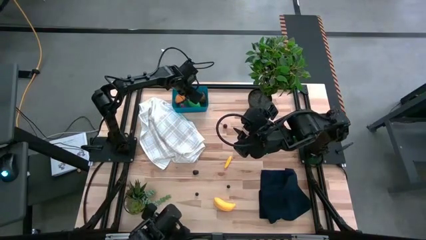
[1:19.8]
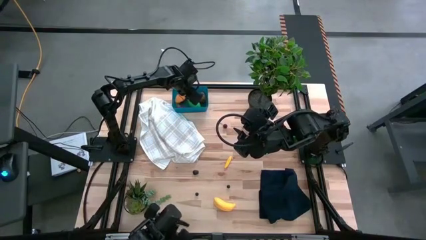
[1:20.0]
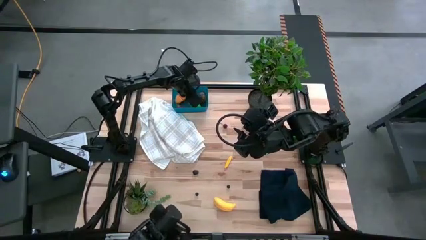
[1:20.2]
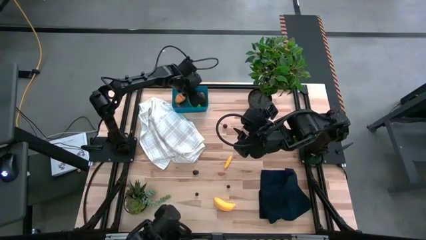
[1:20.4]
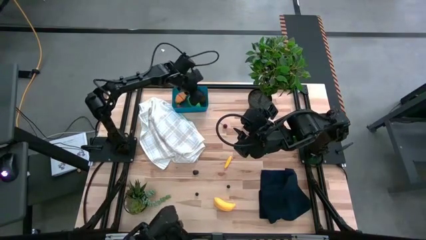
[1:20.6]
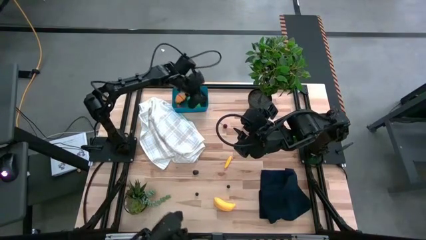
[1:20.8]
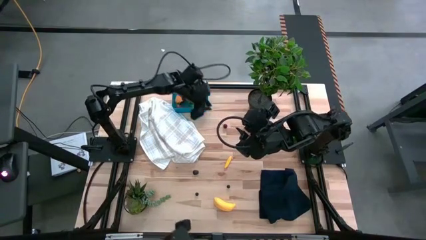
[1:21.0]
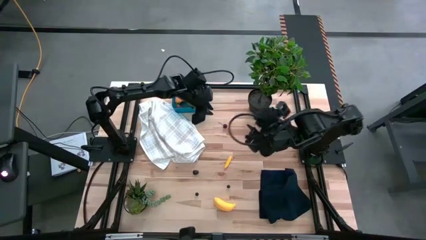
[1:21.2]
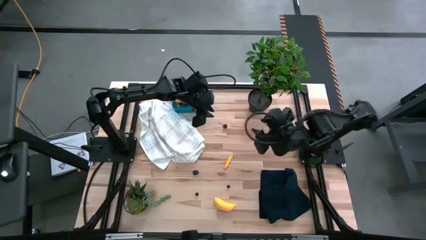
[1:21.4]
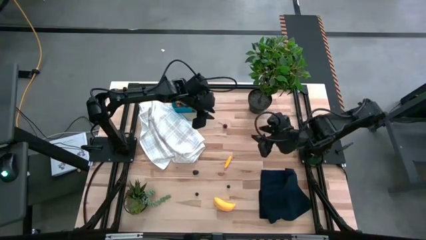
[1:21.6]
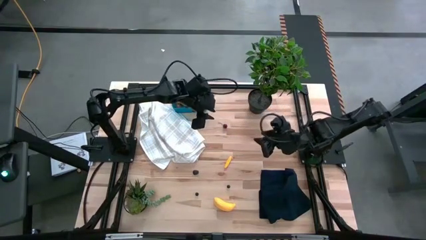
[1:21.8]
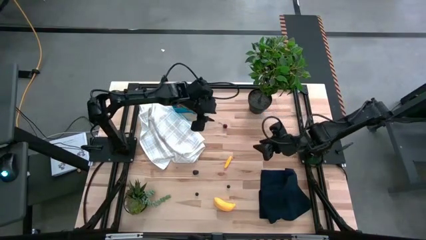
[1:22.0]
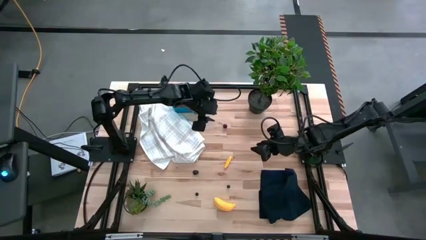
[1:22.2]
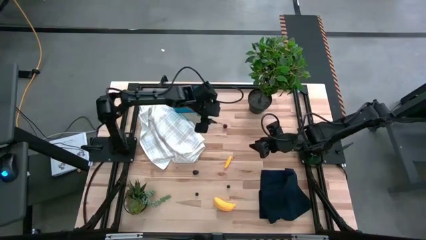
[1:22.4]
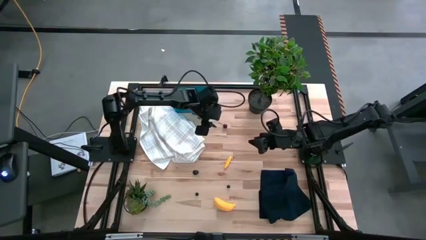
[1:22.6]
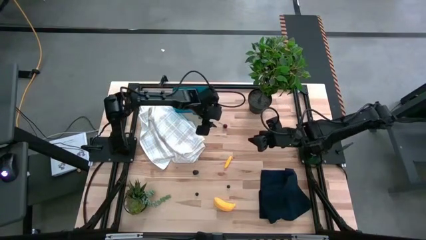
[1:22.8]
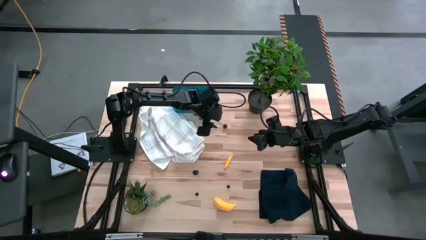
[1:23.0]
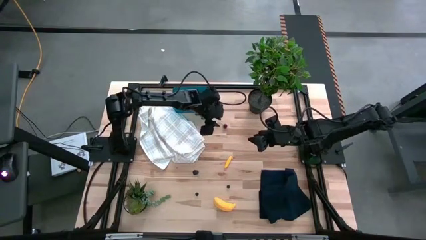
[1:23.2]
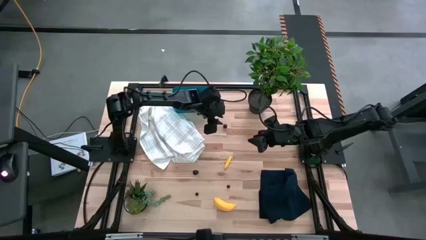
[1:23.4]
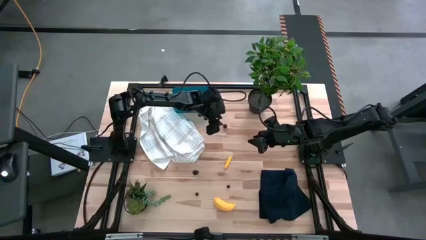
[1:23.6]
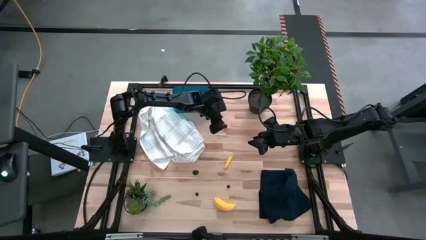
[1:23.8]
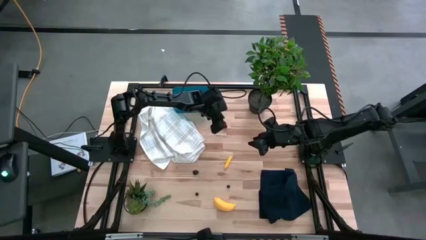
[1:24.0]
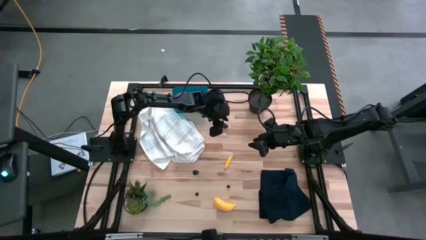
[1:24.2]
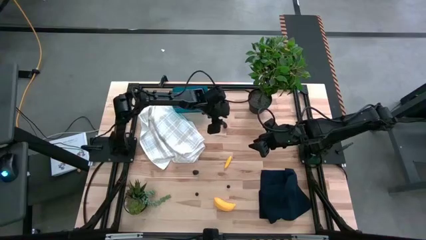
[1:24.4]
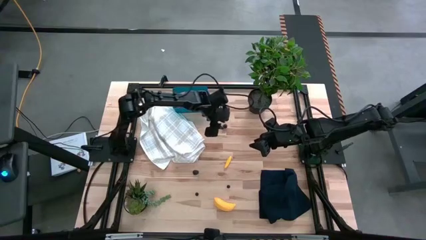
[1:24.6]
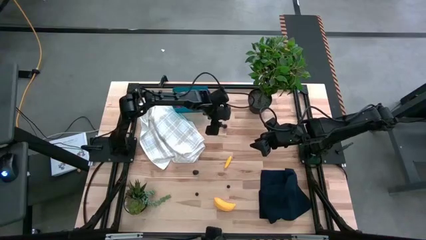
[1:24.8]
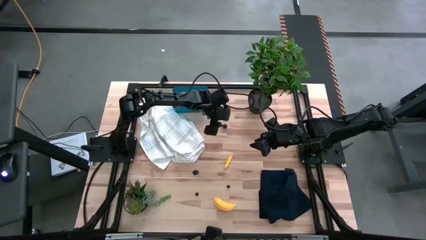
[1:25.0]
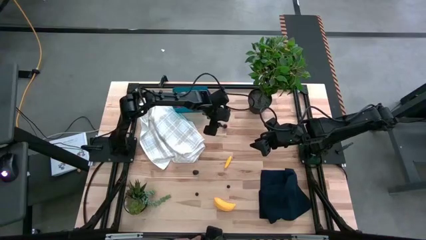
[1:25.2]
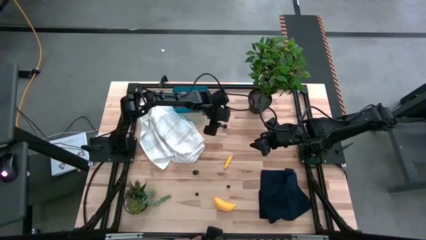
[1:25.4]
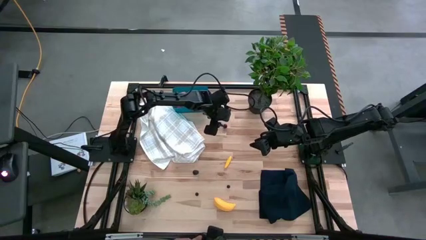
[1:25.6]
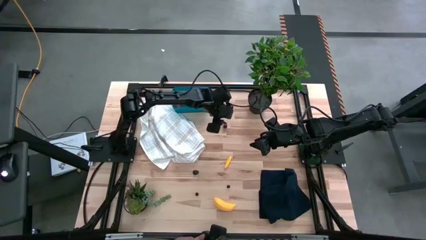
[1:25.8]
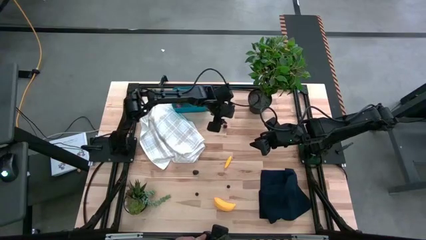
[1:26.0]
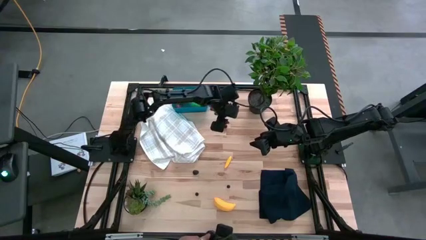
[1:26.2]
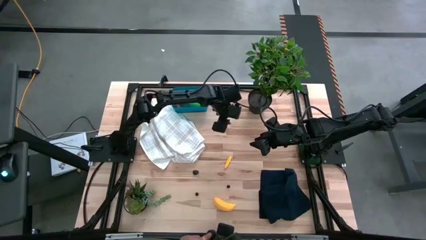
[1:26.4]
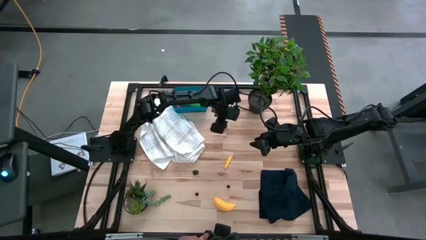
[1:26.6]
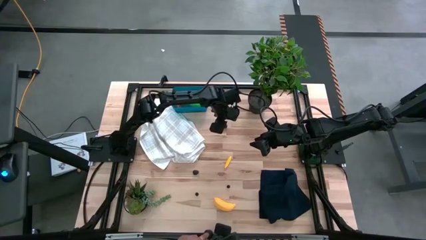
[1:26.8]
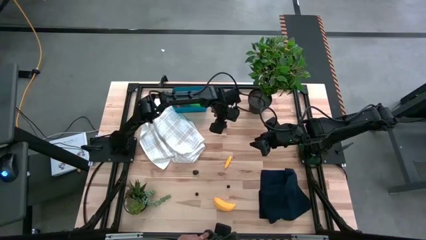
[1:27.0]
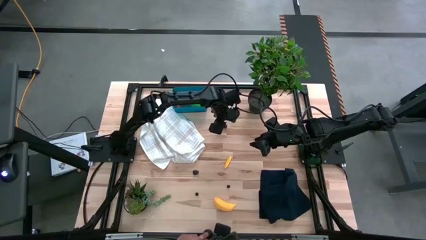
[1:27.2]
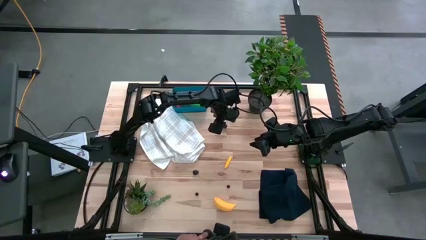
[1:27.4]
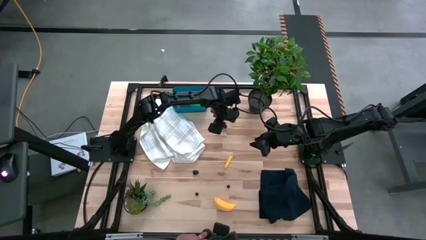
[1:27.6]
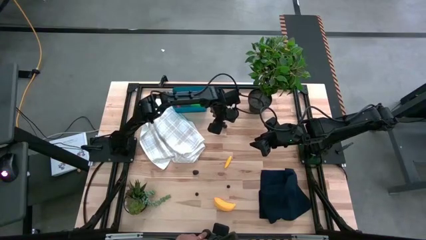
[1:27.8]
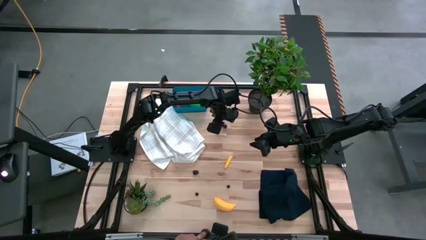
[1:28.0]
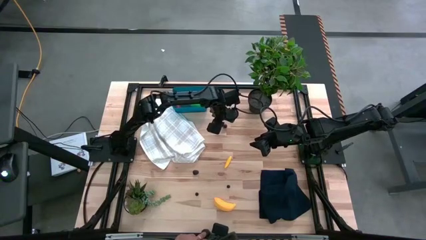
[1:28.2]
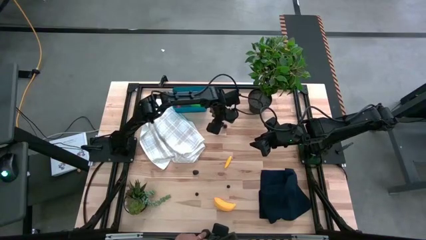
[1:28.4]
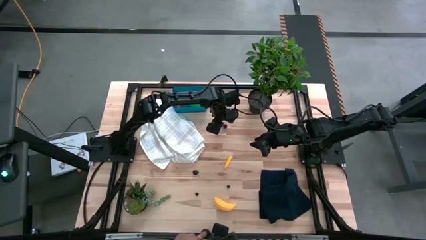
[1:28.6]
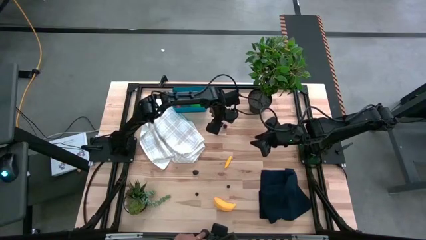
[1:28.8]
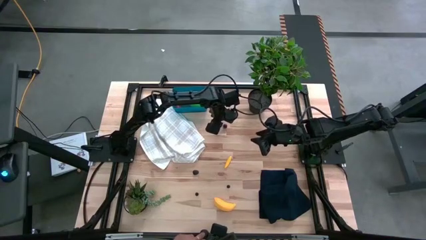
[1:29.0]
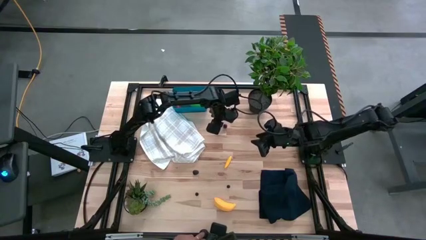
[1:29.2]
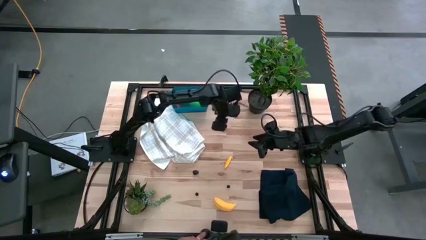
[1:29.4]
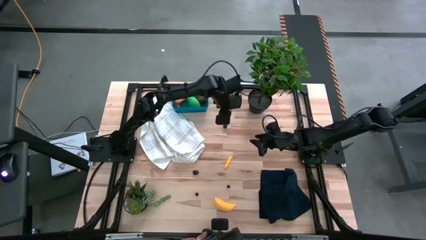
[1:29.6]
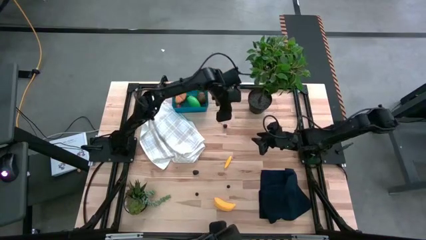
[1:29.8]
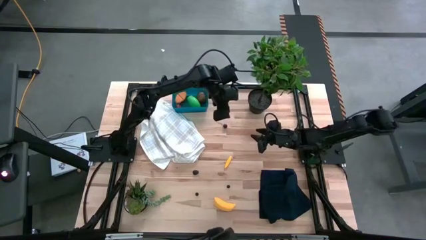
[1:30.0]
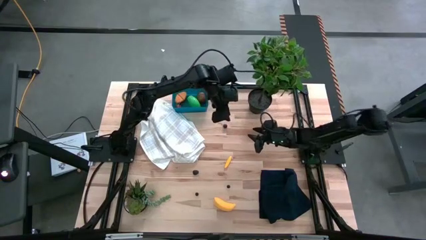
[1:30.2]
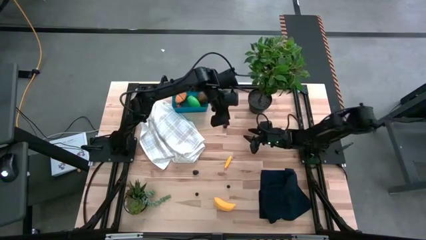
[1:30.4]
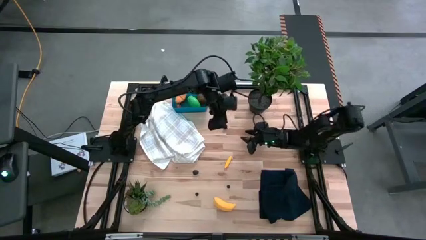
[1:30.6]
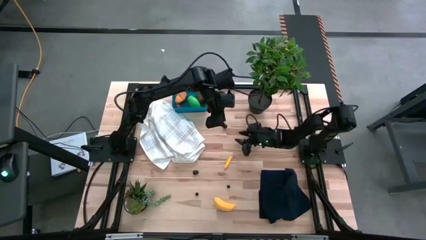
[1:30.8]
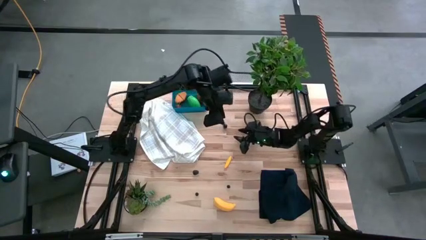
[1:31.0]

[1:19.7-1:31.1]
Task: Pick and placing Produce into tupperware
Put the red cherry into the blue bin
